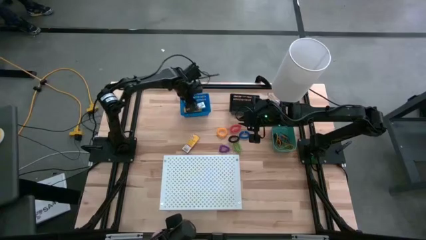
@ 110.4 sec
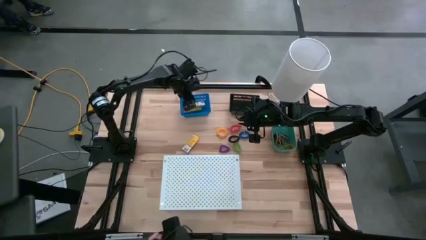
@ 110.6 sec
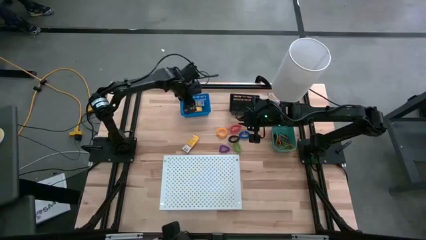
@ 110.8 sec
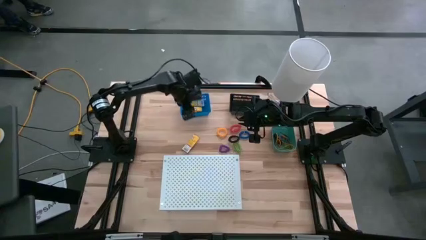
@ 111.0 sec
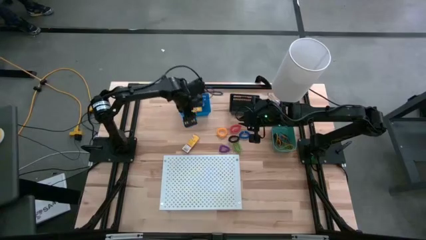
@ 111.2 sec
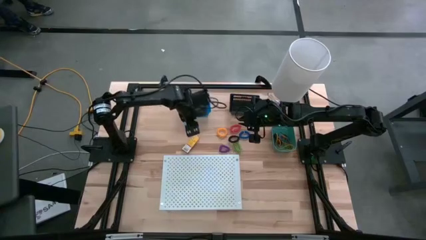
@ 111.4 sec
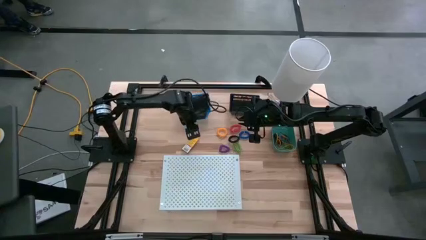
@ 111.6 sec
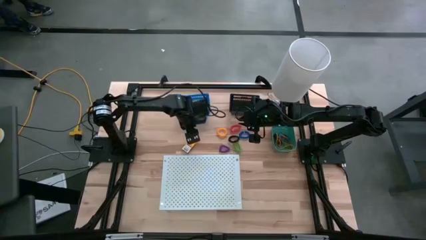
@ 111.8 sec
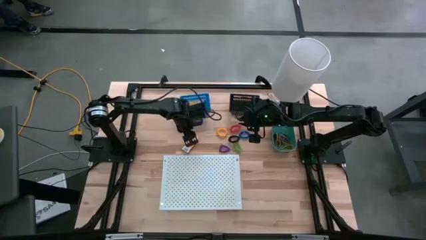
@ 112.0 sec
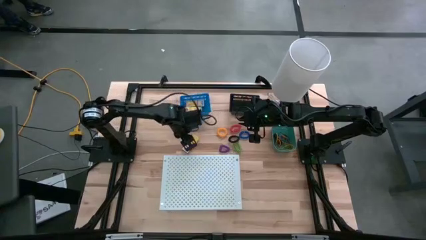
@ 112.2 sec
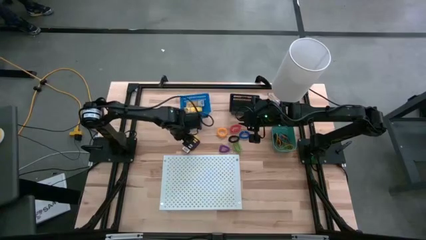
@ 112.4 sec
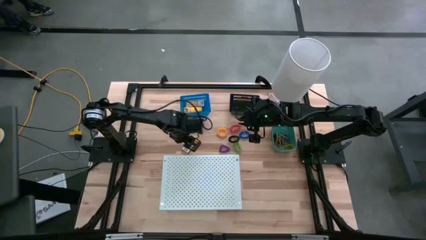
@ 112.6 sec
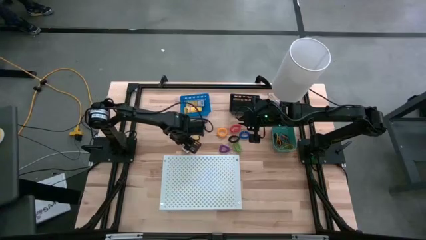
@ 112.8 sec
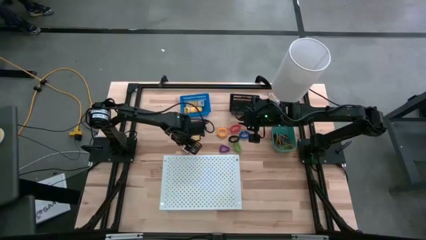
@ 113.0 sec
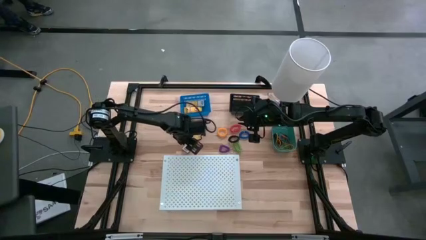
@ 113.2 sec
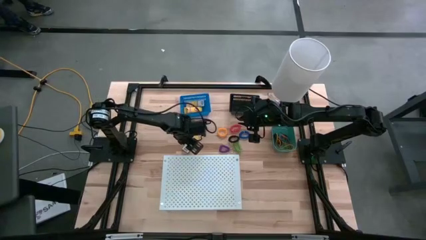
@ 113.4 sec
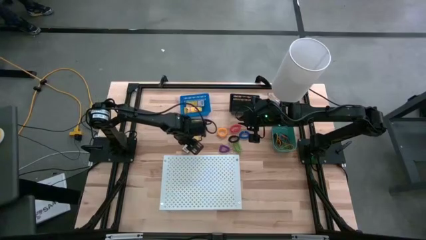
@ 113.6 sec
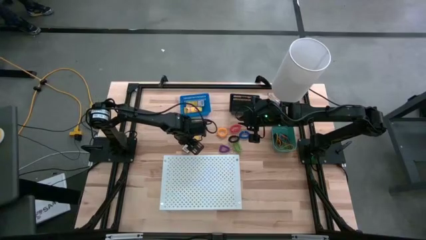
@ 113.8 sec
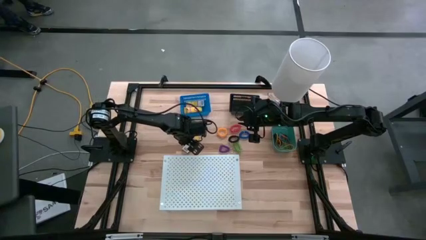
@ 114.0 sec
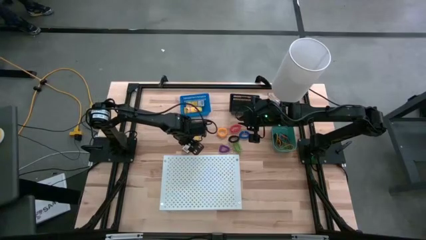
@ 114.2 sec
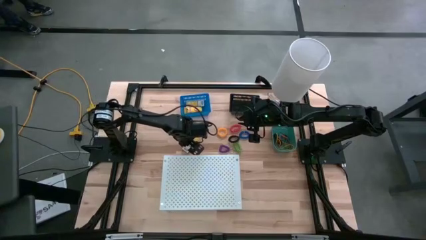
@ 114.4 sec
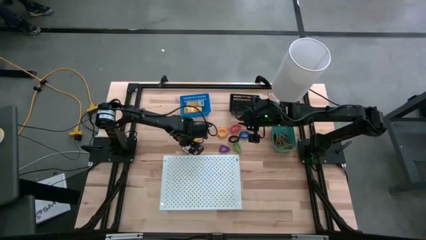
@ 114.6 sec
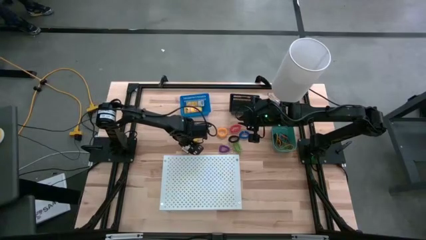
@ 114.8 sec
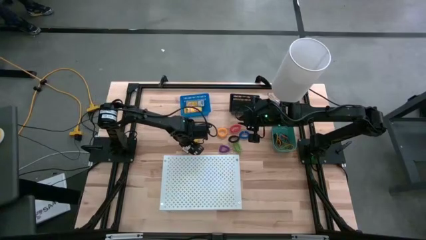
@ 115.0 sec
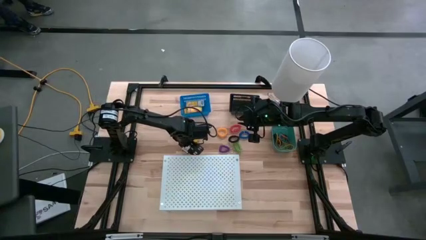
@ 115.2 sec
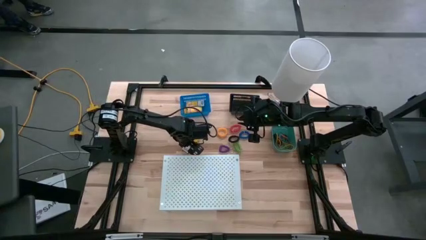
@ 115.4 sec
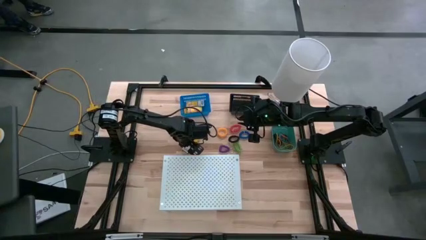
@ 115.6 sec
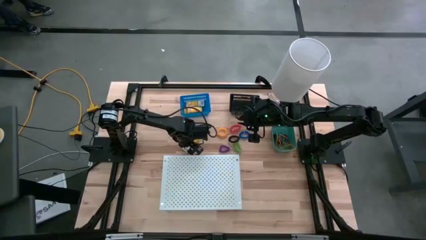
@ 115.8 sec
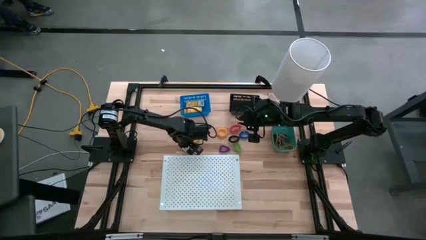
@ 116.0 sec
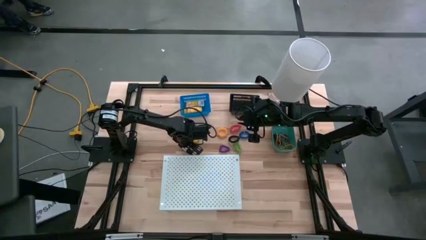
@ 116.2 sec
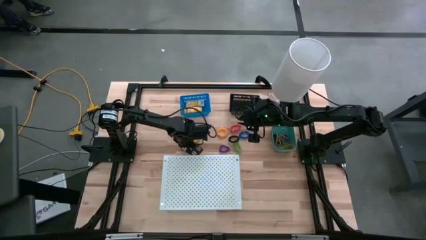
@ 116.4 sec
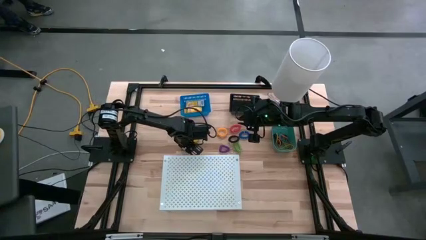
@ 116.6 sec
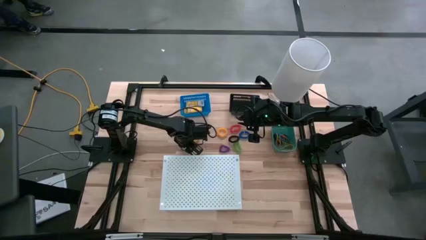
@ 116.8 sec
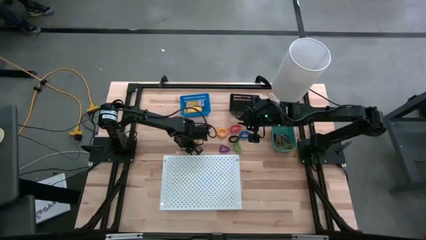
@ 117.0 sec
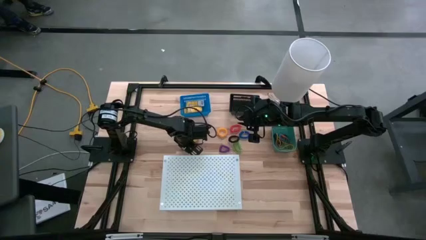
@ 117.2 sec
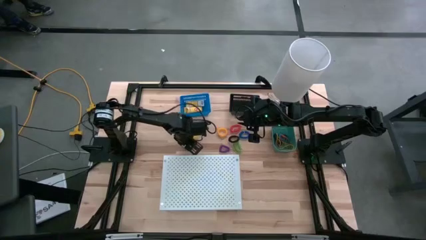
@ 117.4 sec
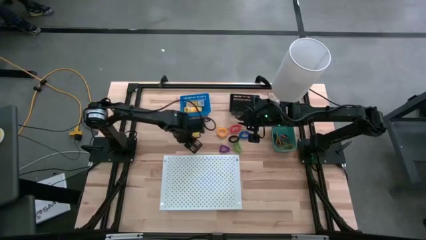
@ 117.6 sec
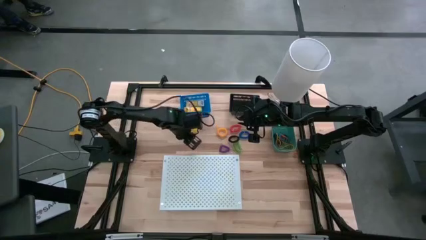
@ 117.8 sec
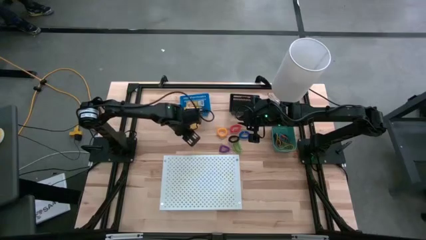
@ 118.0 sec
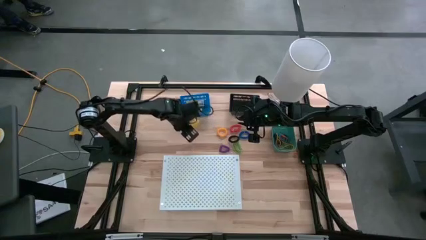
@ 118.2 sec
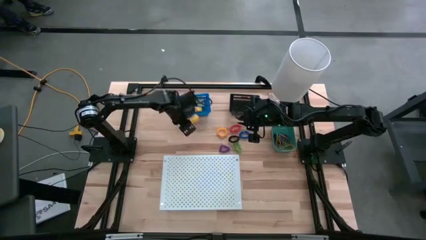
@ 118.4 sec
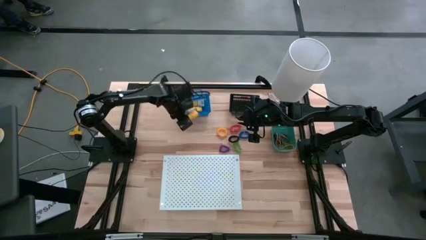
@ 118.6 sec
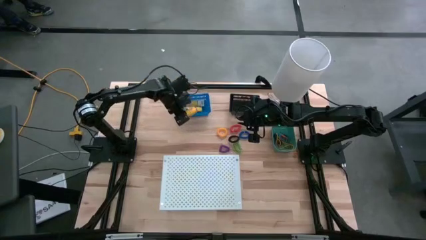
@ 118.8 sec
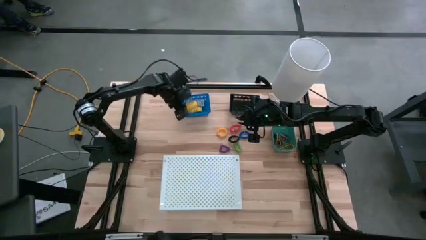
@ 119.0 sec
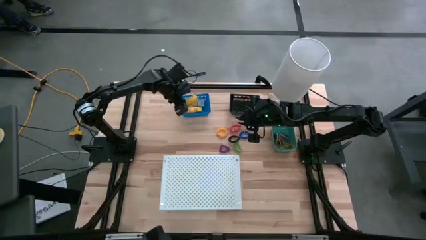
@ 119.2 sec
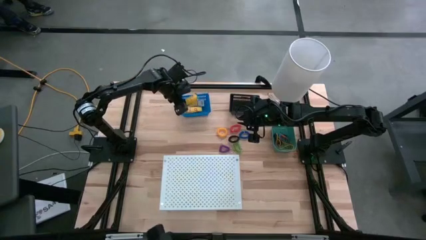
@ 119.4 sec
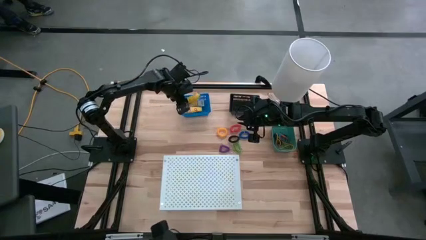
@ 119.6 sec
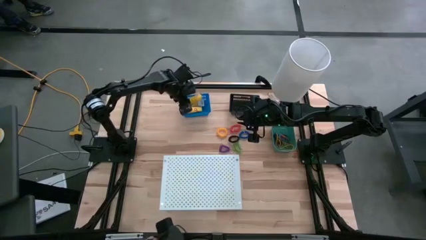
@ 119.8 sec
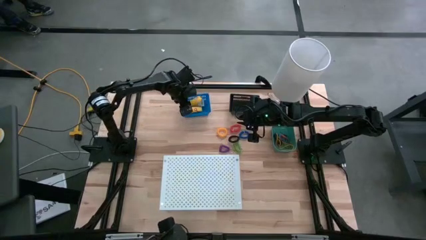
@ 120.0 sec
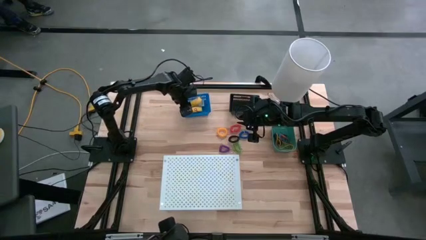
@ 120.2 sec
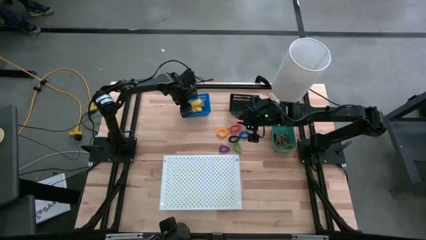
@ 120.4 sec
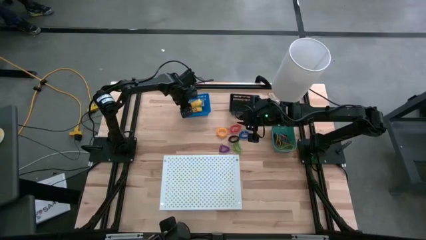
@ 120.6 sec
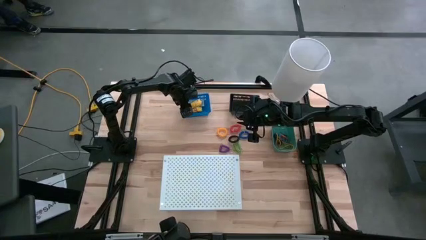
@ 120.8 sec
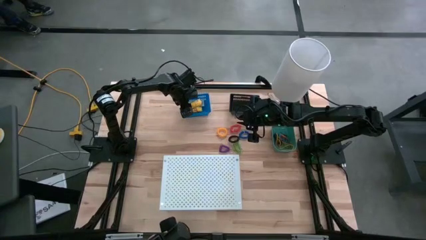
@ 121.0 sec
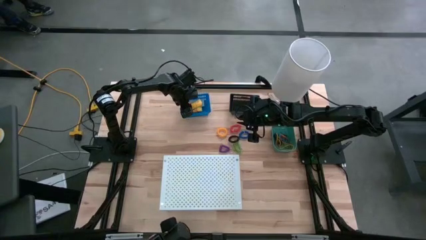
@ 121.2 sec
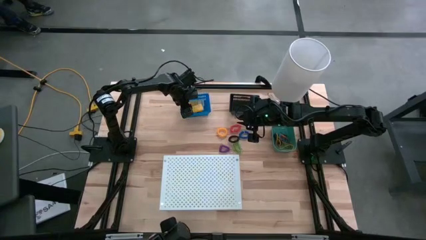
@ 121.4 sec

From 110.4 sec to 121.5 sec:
Task: Pick & Place Office Desk Supplies
Put the crayon box into the blue bin
